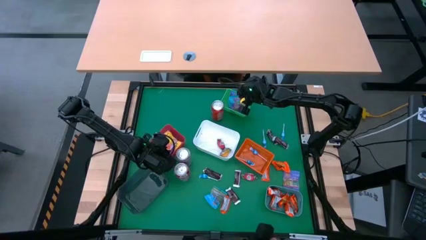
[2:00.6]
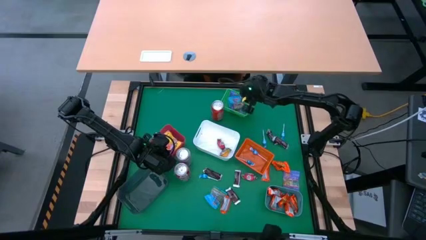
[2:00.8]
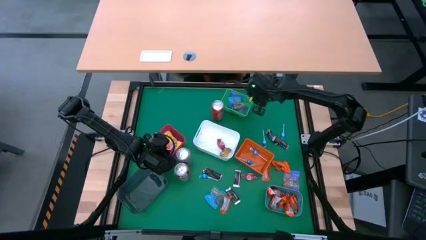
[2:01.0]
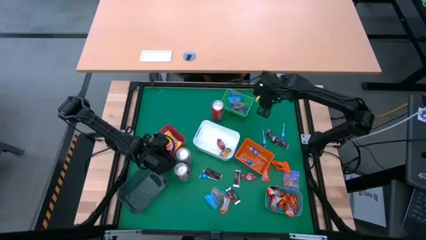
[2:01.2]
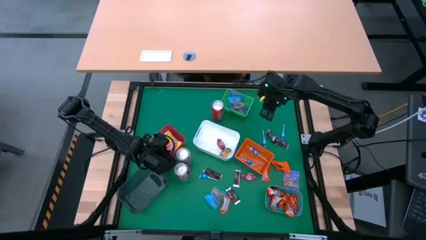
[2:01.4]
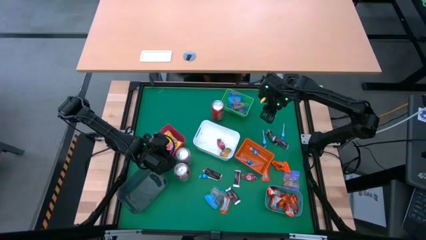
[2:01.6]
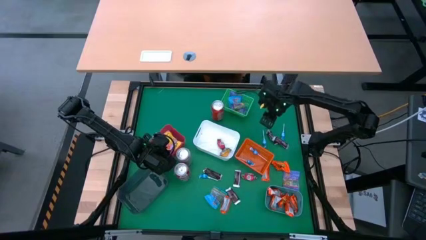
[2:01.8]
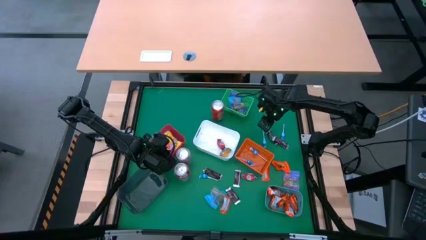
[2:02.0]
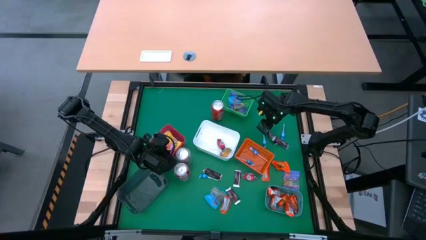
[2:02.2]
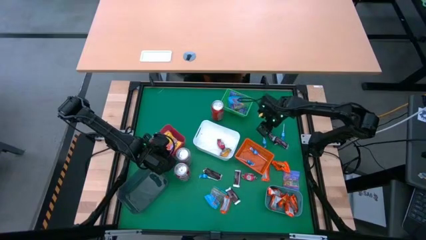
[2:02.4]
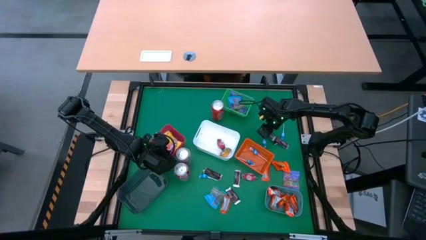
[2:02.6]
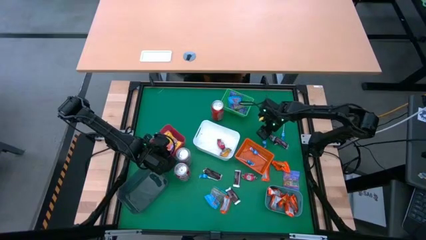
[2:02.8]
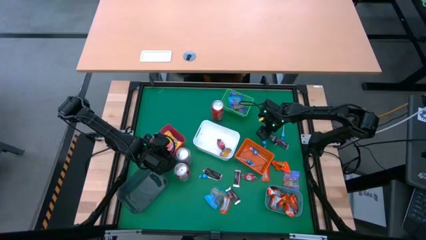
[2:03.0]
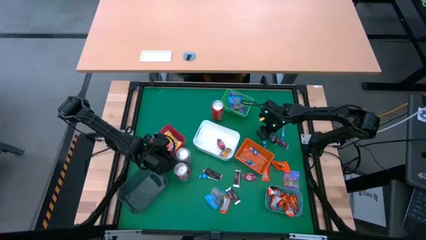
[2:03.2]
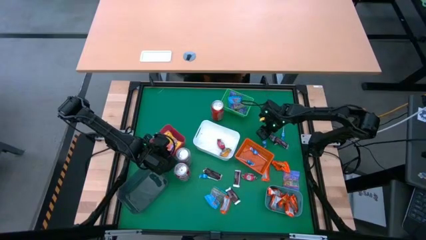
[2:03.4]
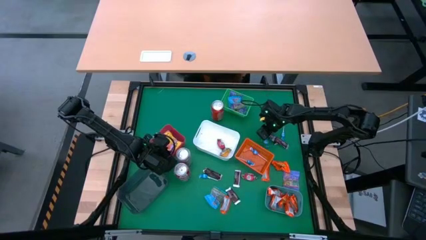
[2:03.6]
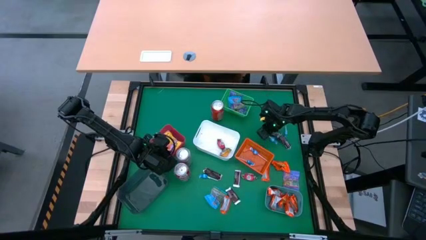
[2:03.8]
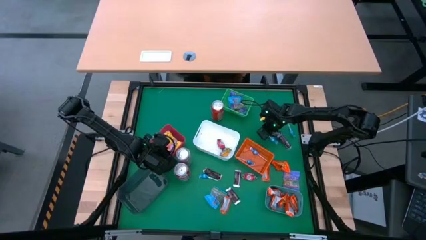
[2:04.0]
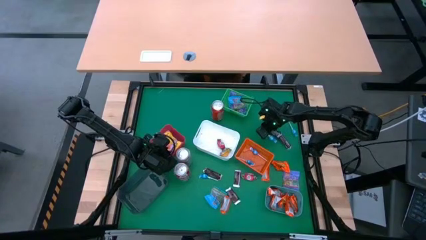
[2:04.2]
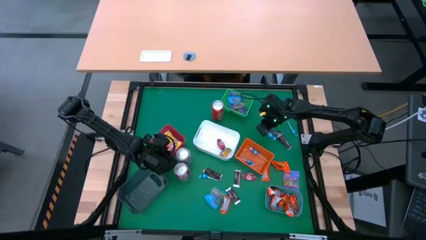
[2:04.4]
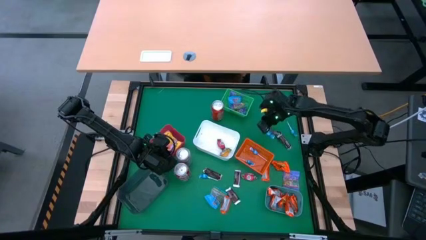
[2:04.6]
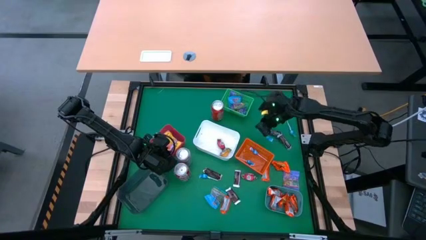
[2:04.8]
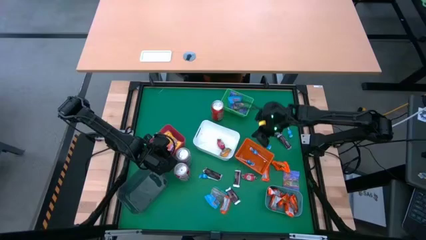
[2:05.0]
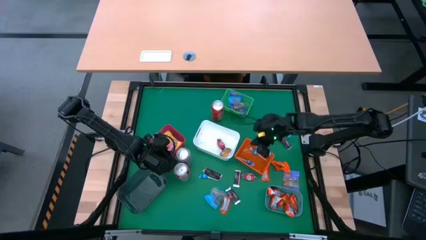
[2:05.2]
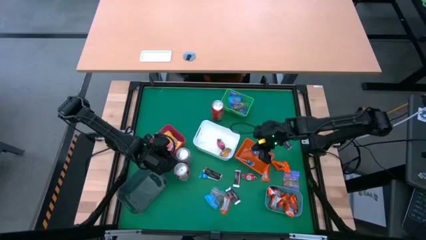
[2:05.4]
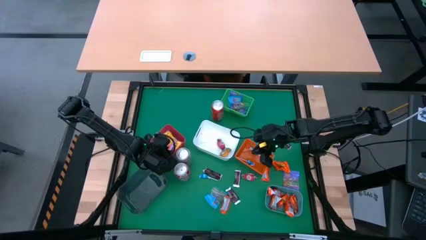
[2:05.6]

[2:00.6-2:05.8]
Task: Sort candy
Put the blue lollipop into the orange bin

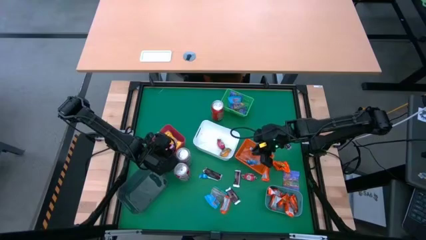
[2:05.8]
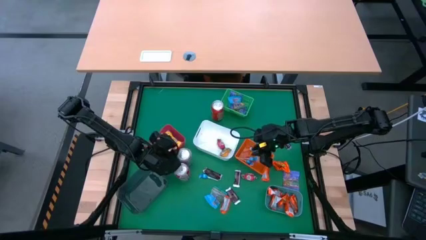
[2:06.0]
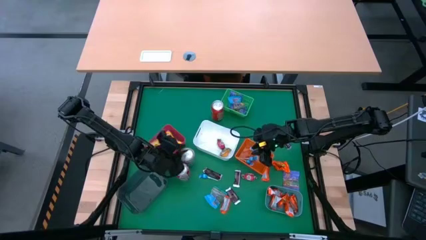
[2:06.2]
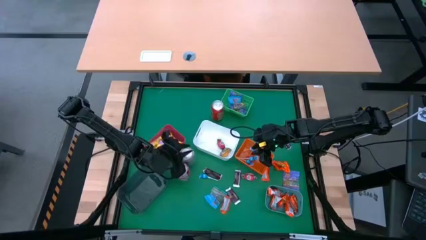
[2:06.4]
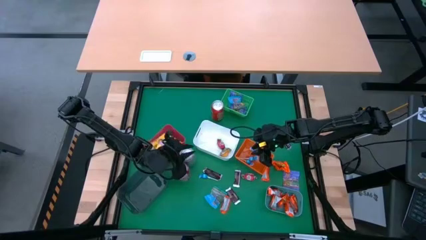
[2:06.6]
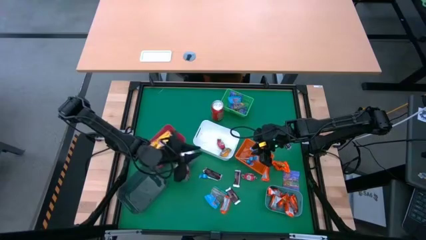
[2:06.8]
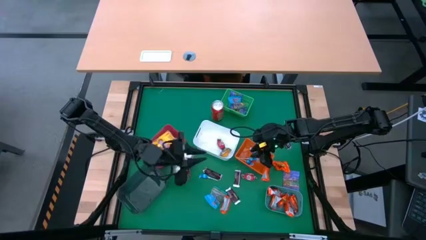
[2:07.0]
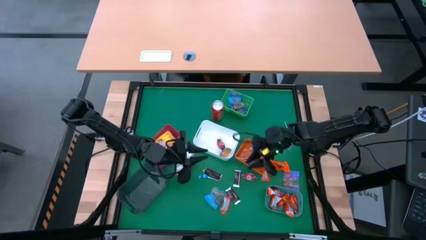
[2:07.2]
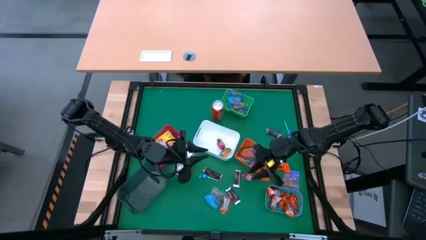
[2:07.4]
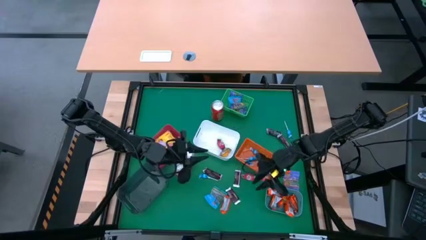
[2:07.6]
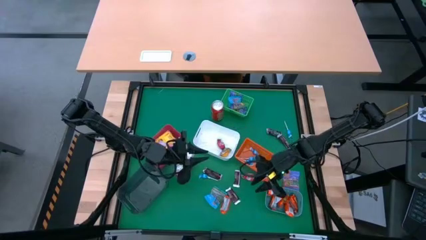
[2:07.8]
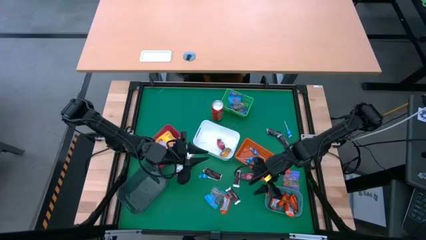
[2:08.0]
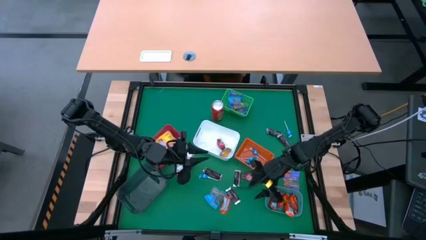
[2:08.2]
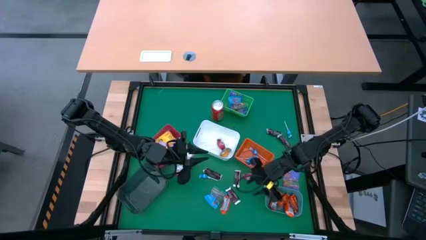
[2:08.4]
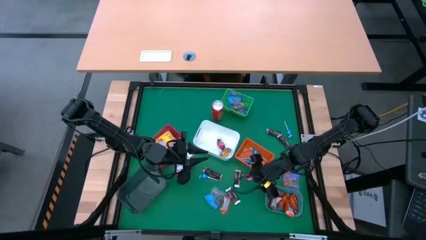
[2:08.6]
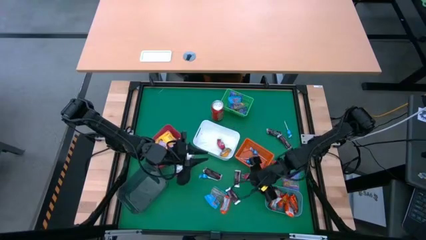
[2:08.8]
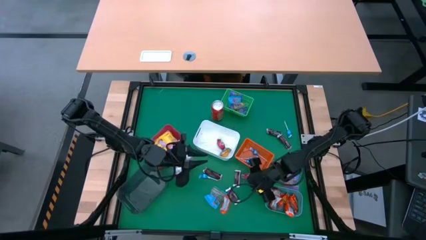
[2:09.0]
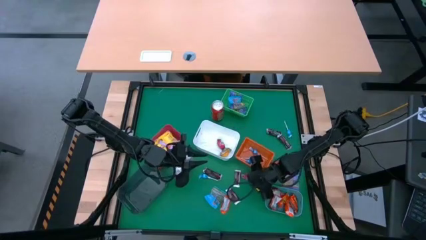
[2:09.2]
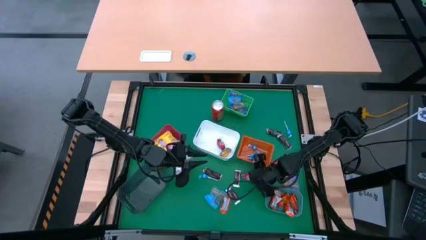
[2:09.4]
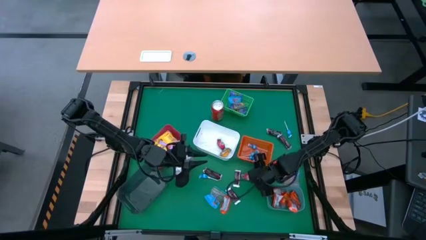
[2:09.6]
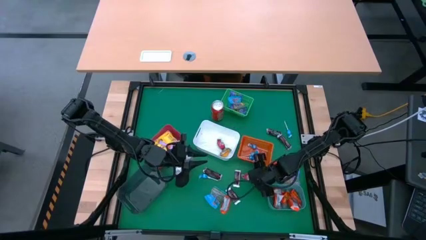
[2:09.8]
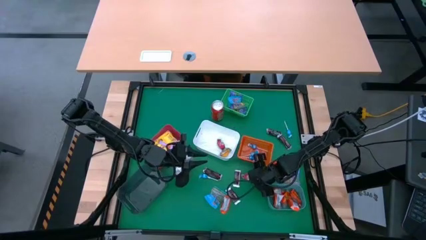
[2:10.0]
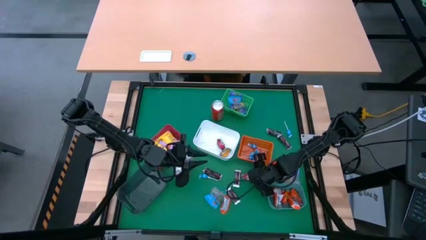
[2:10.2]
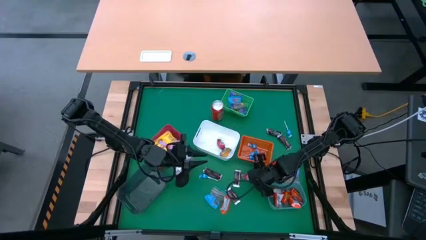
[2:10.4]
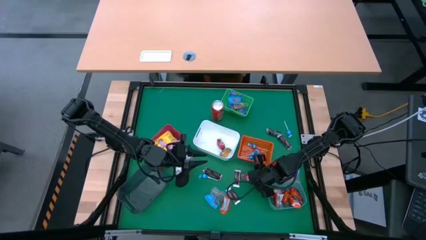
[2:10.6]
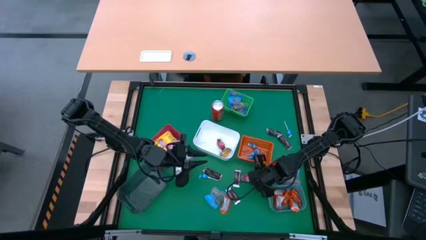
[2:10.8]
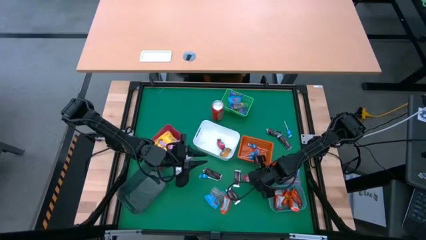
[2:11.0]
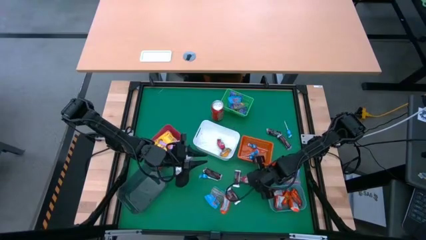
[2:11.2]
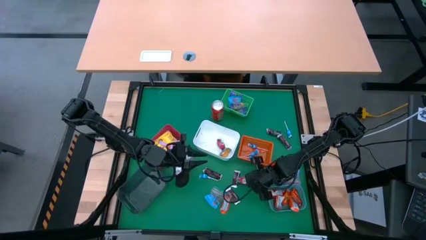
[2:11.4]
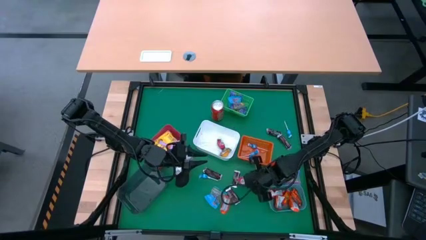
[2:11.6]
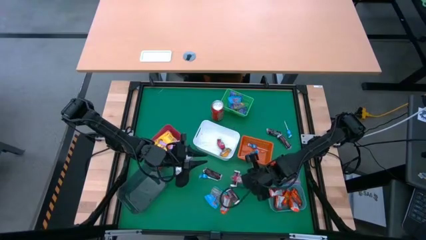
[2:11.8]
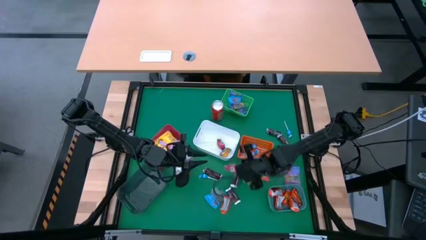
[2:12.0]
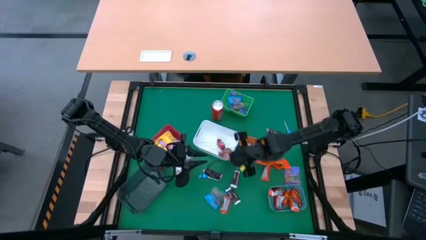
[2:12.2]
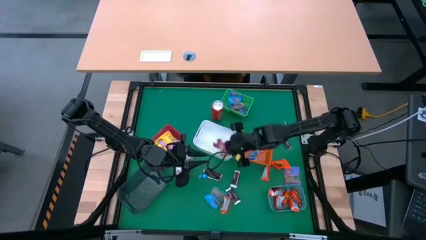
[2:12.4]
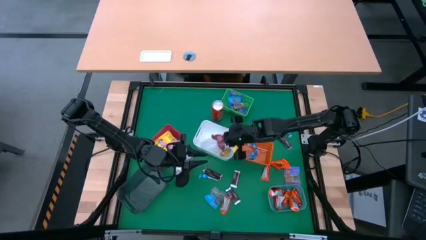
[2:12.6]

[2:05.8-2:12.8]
Put the pink chocolate into the white bin

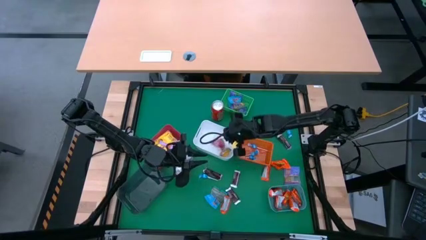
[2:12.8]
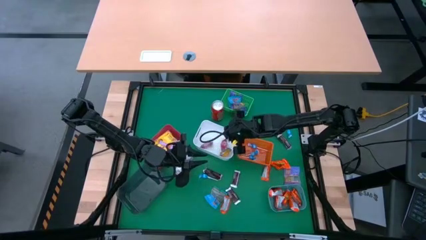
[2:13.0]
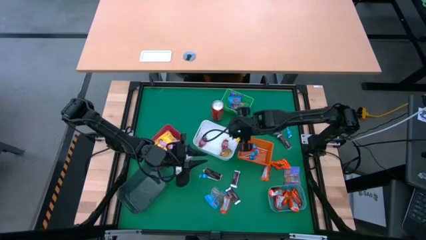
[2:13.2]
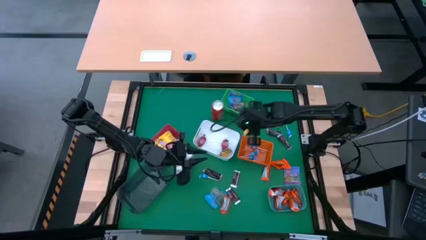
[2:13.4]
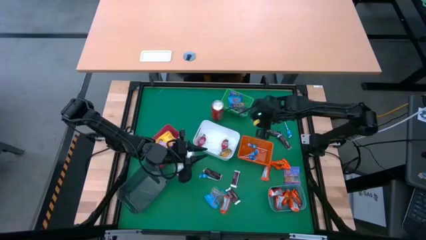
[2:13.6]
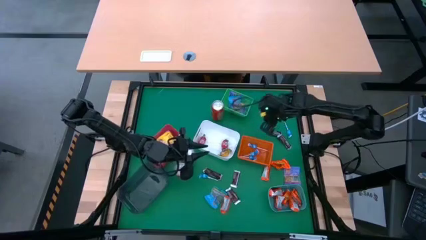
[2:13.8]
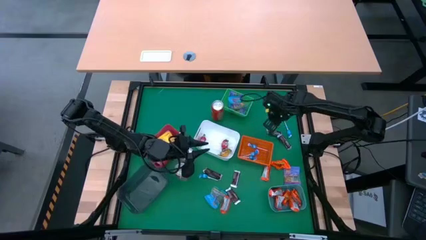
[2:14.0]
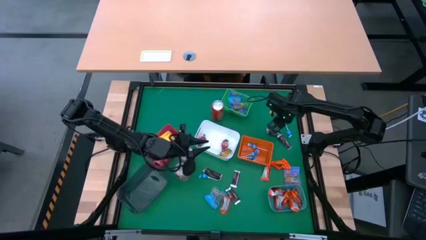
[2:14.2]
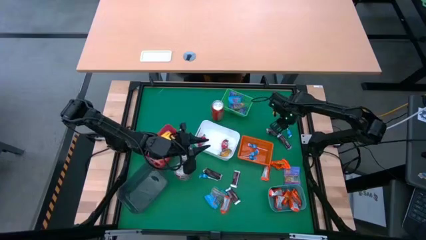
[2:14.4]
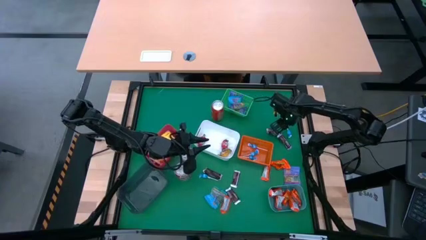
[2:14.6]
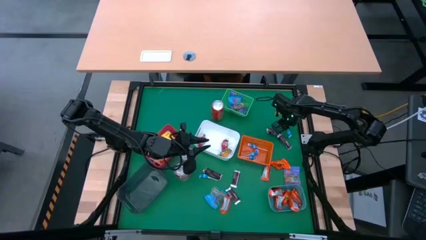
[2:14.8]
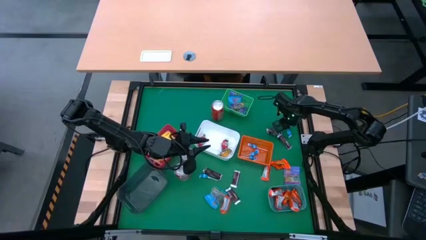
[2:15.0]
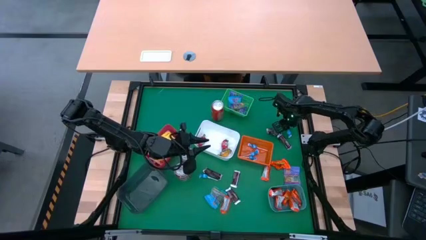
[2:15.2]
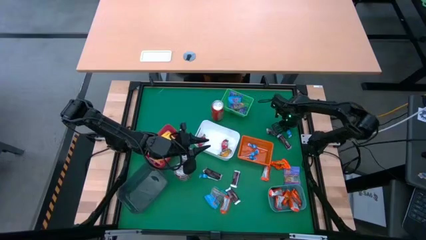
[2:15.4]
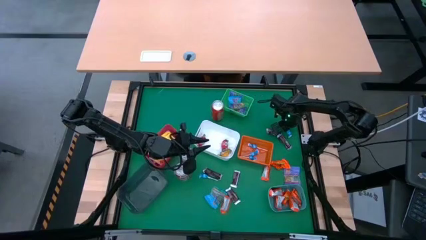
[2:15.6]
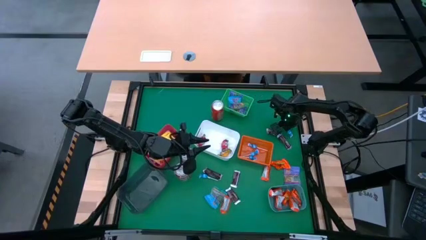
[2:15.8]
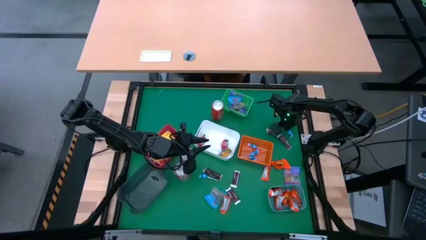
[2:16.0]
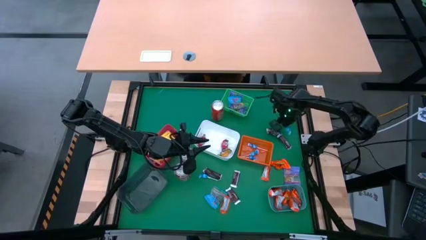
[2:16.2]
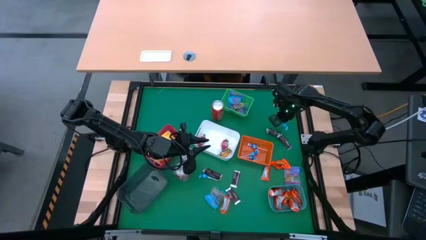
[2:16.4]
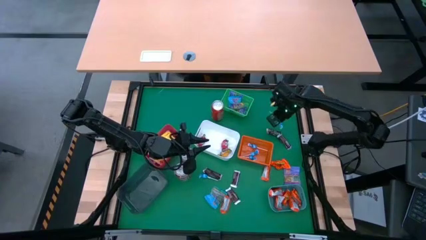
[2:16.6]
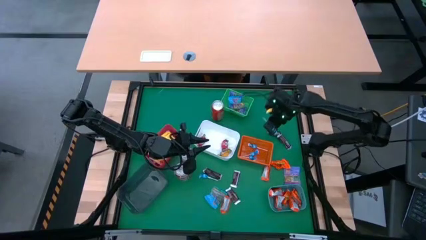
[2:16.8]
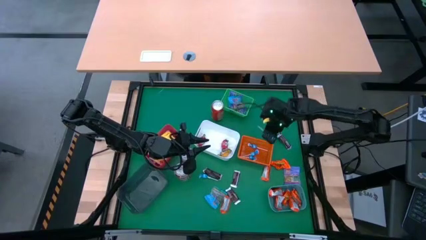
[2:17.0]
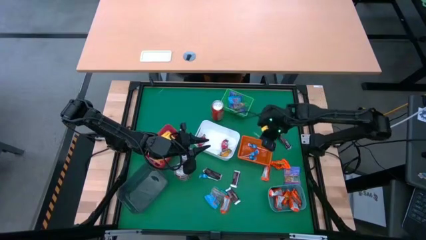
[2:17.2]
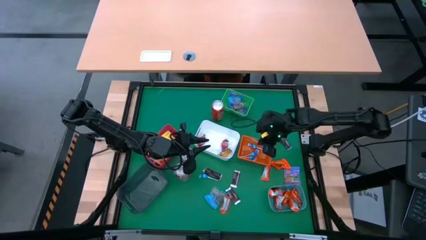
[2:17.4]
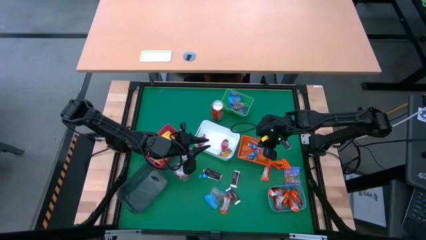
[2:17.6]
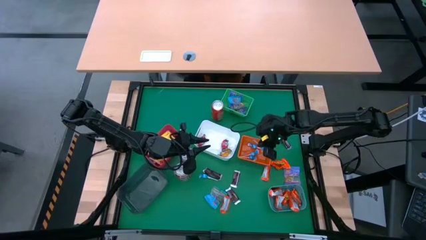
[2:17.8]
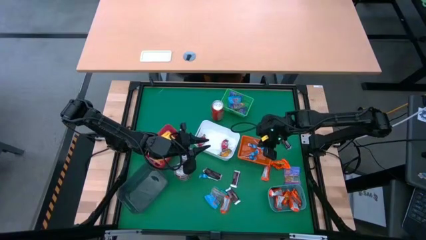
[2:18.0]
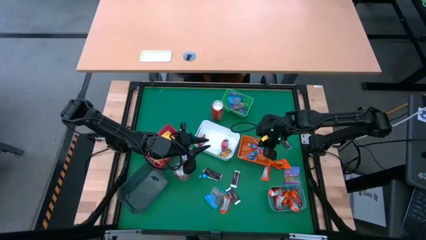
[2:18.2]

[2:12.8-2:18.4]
Put the blue lollipop into the orange bin
